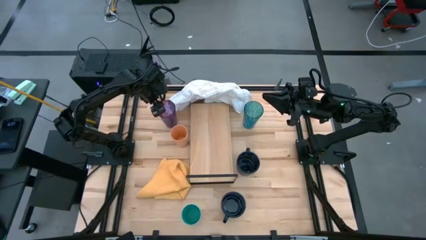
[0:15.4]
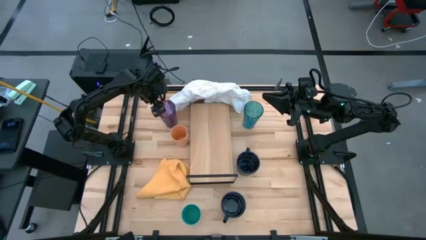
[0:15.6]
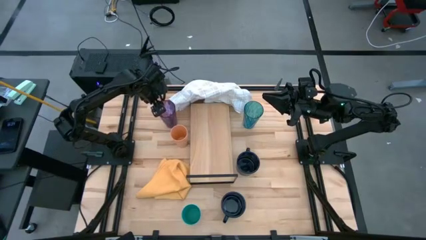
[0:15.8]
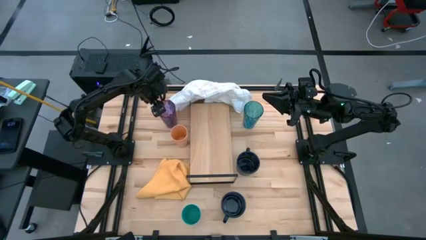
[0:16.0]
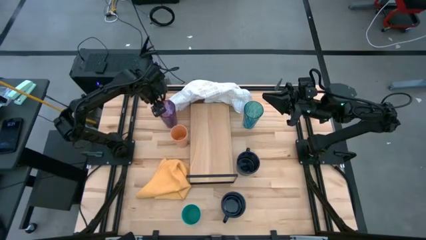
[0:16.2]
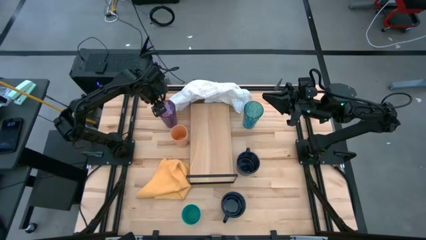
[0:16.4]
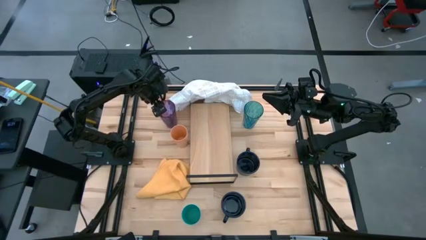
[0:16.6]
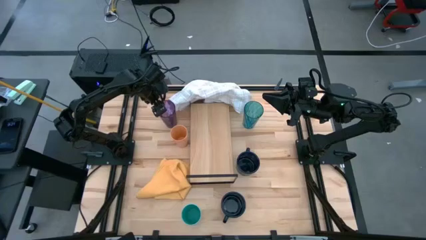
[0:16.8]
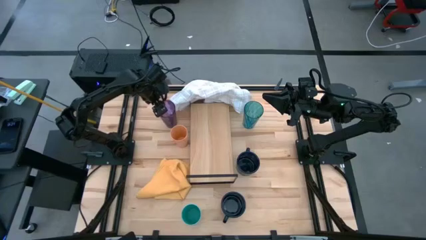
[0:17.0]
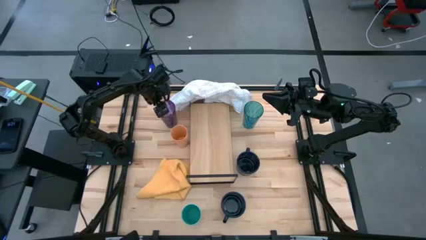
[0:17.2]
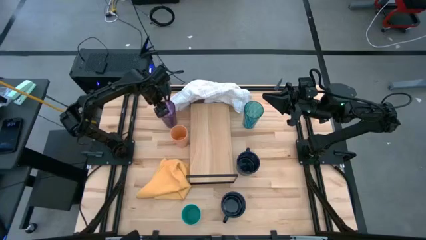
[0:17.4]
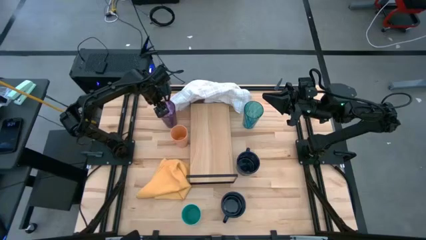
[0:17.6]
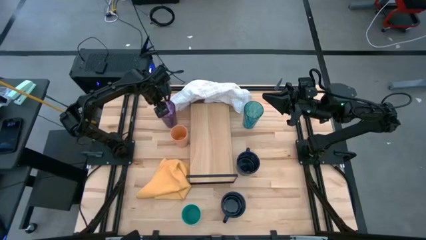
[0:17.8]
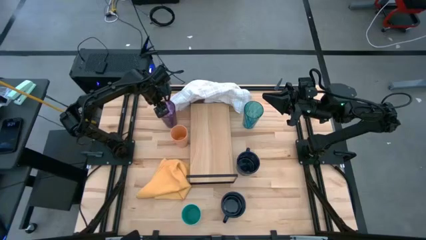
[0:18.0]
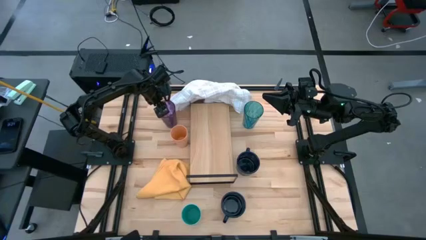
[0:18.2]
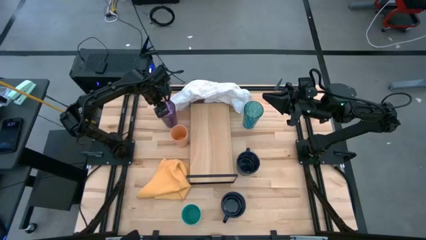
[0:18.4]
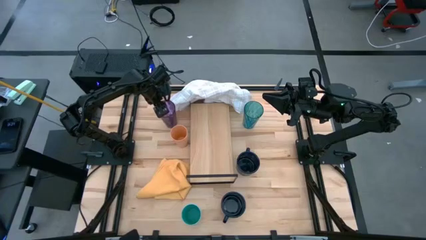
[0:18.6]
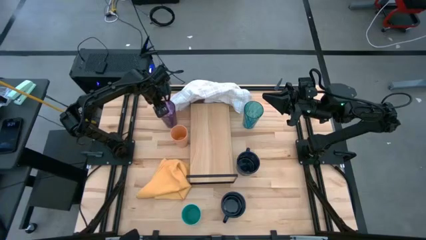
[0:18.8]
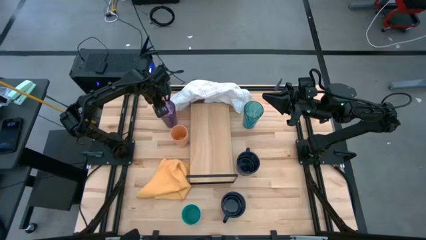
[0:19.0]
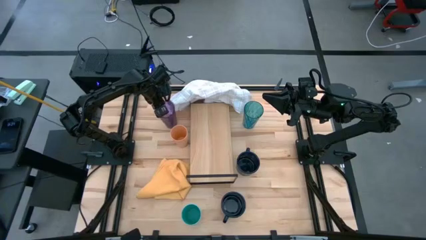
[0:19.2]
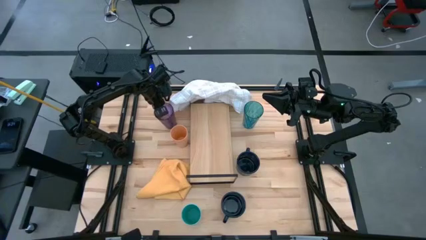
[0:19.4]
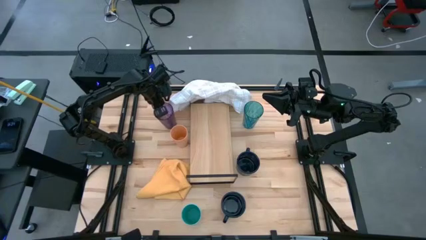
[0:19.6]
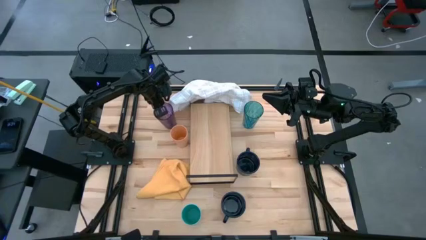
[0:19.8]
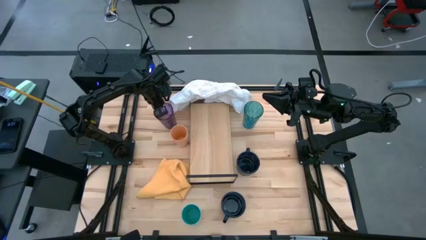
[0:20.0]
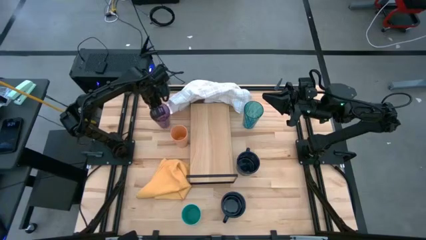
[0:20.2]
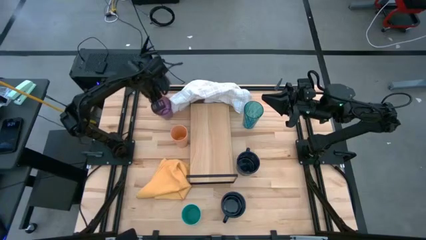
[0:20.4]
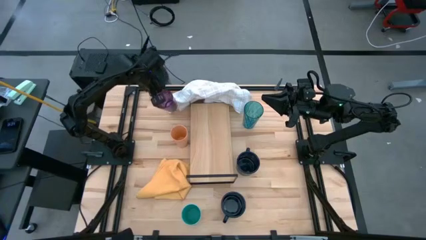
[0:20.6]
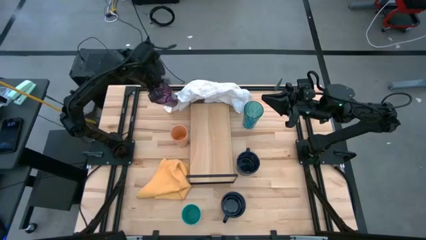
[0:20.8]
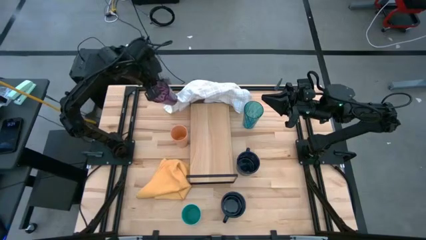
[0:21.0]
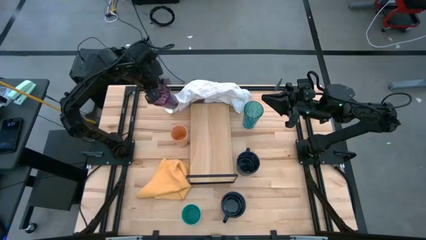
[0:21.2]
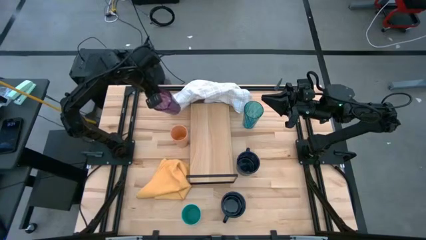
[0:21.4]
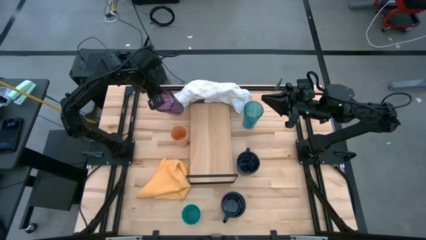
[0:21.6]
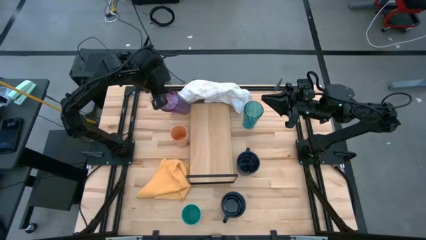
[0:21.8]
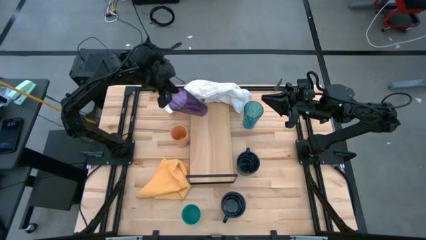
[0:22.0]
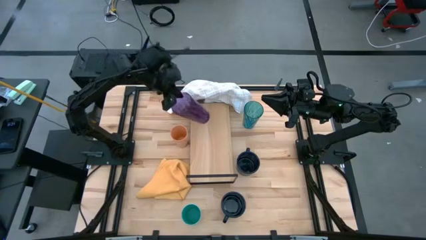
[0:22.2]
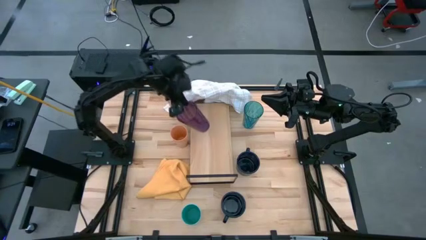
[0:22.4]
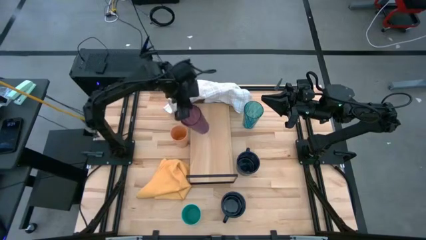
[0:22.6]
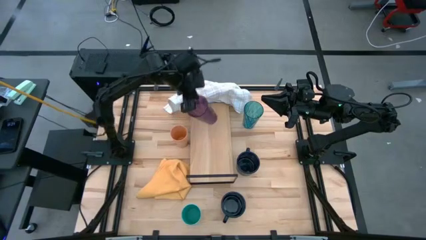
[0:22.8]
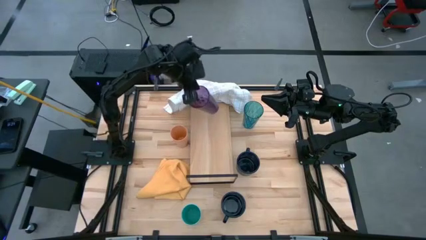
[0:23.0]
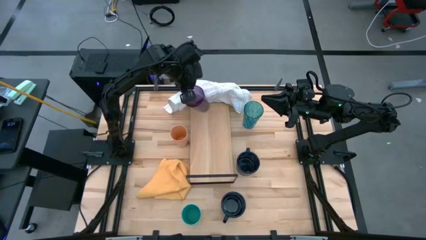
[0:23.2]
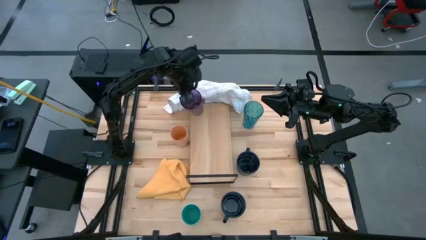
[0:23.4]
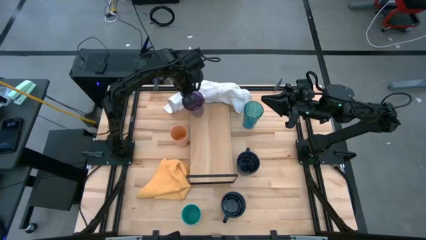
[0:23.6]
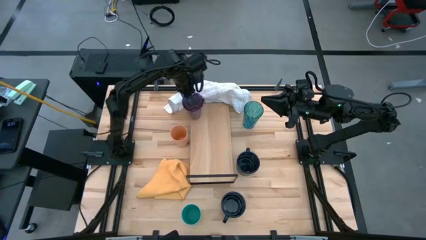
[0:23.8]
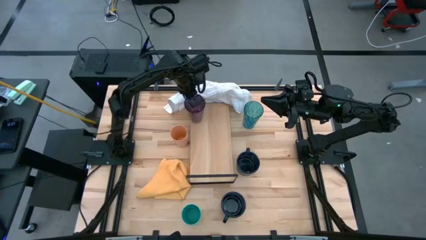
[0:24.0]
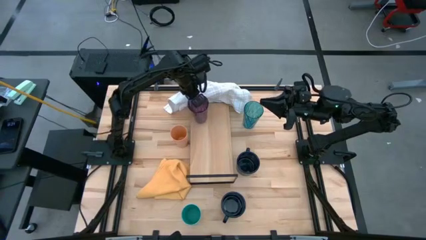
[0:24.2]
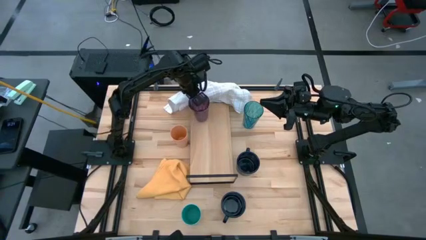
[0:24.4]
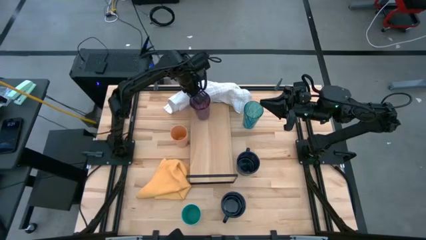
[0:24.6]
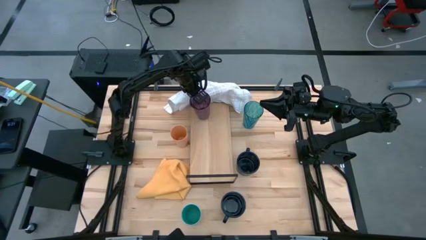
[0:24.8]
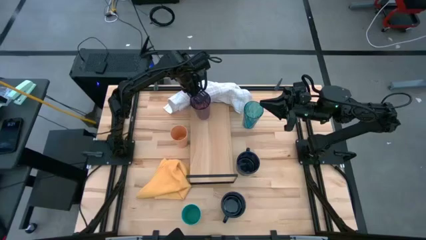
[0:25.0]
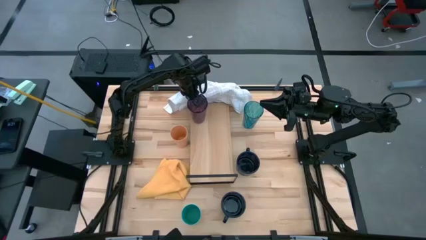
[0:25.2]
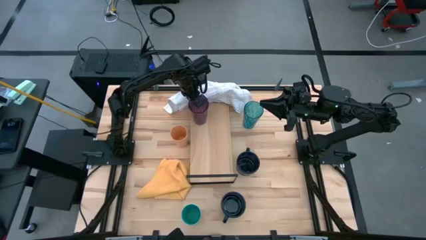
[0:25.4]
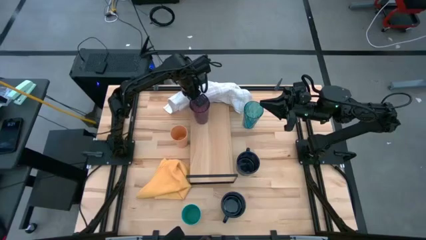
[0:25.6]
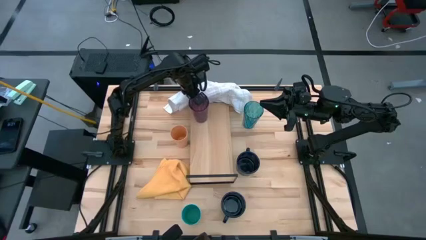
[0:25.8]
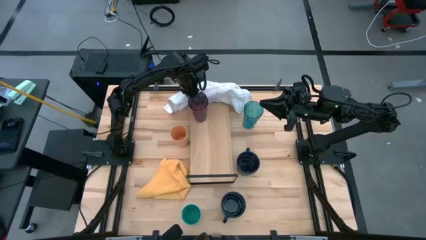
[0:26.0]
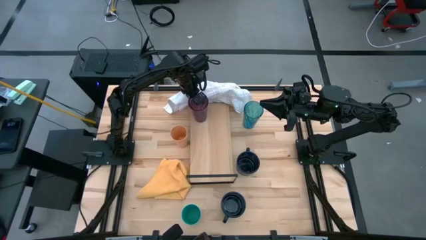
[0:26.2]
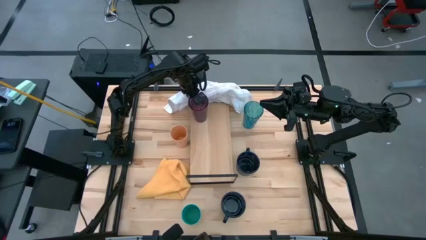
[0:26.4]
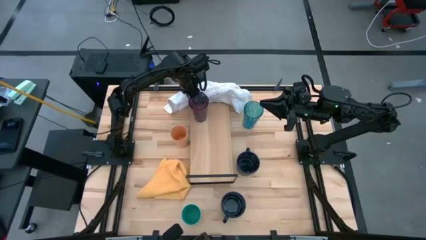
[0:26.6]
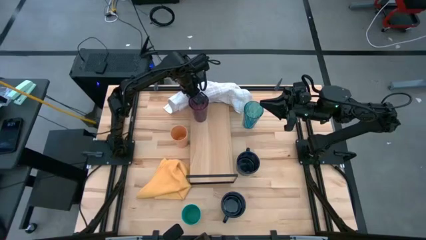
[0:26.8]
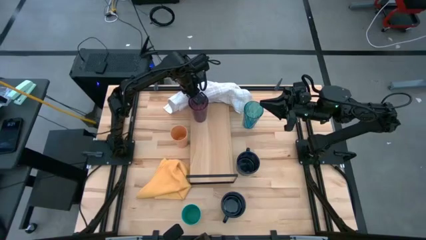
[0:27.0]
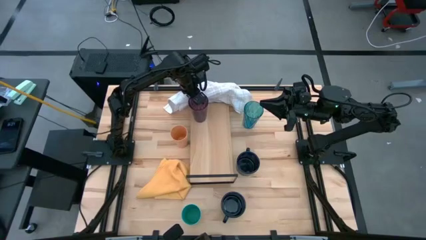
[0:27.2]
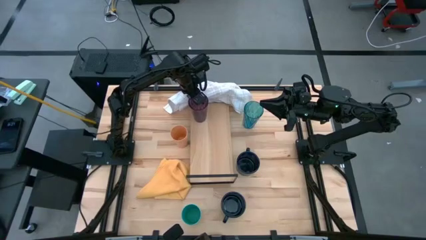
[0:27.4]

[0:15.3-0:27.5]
Task: Stack small to large cups/mugs on shelf
Put the purple cup on the shelf
